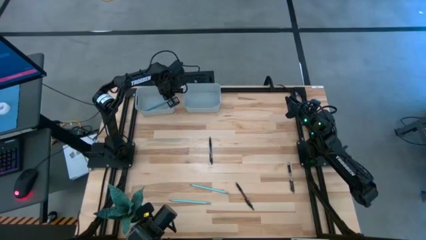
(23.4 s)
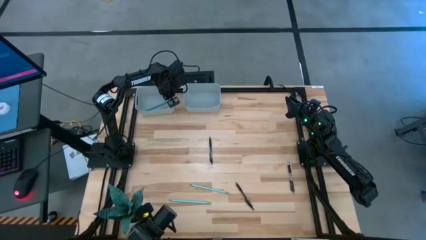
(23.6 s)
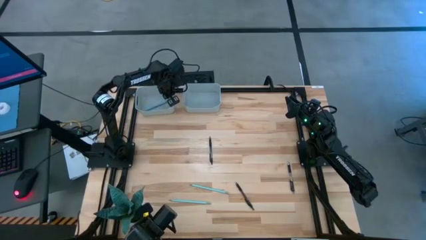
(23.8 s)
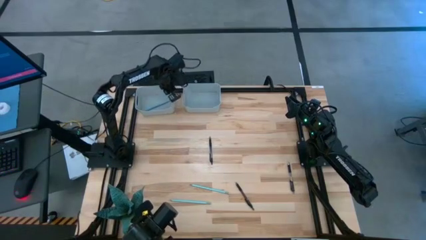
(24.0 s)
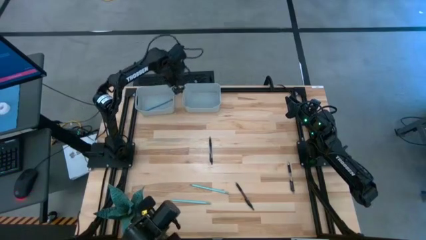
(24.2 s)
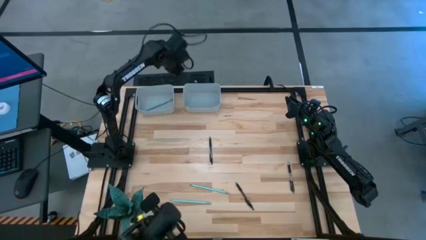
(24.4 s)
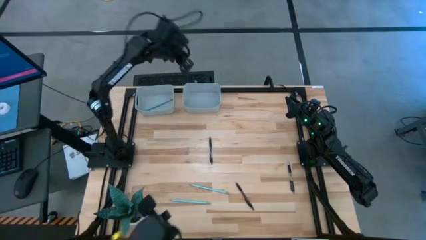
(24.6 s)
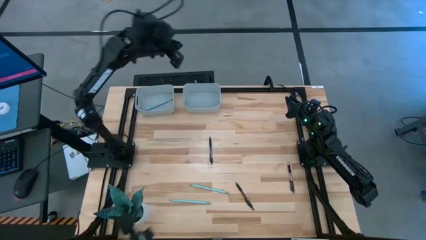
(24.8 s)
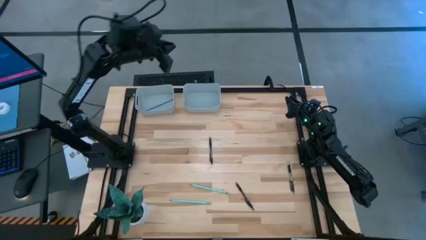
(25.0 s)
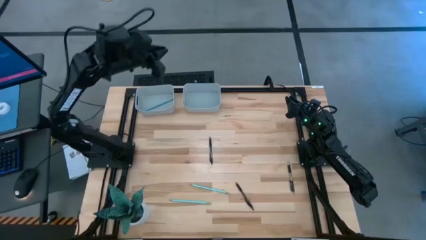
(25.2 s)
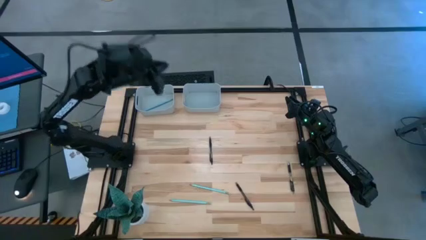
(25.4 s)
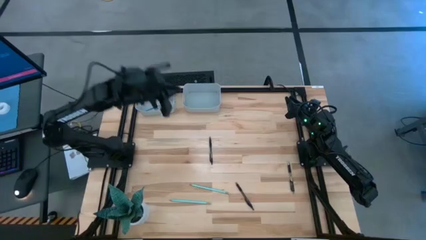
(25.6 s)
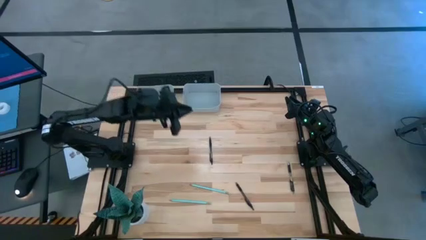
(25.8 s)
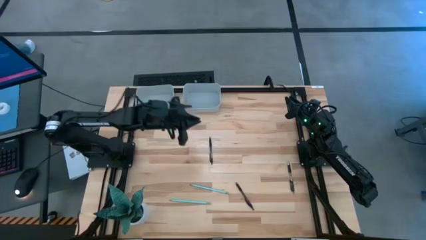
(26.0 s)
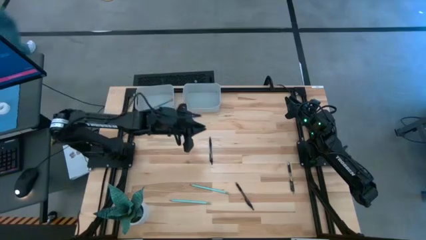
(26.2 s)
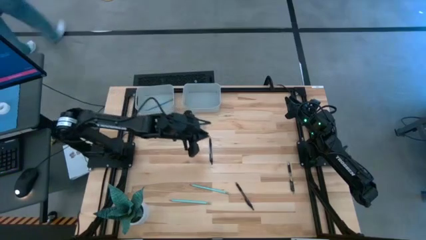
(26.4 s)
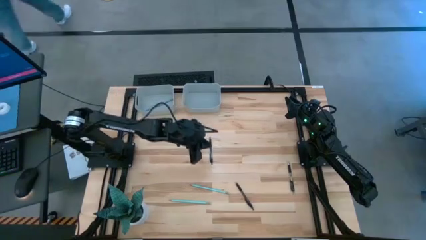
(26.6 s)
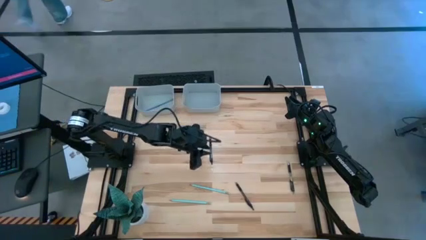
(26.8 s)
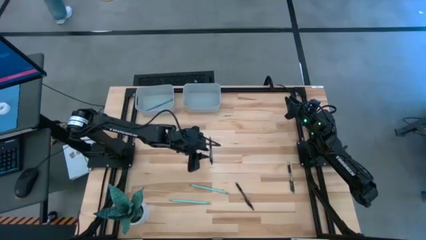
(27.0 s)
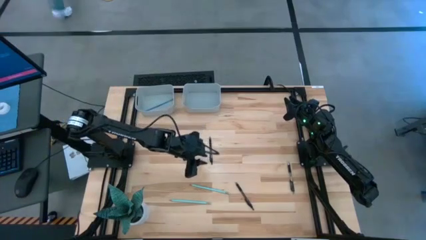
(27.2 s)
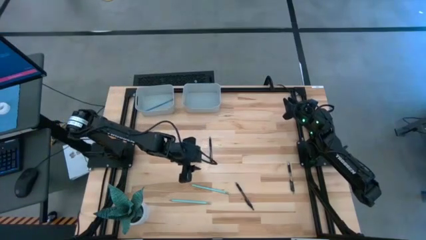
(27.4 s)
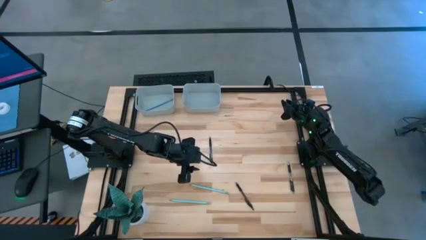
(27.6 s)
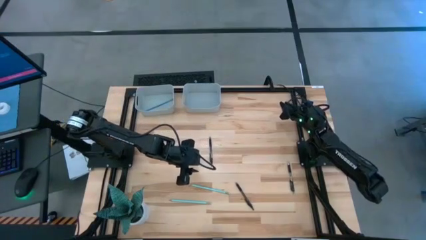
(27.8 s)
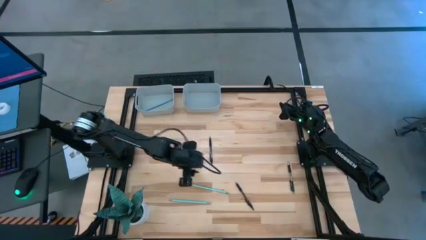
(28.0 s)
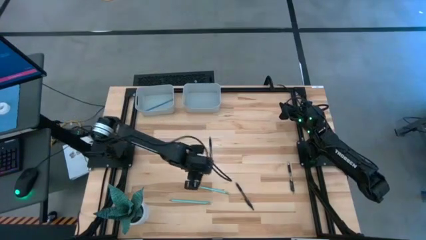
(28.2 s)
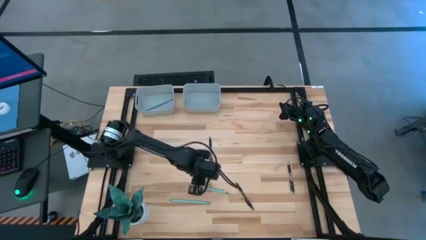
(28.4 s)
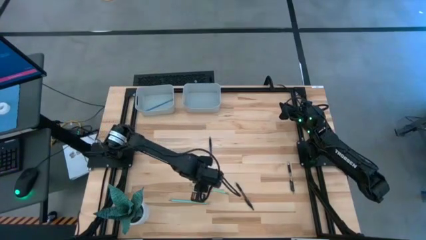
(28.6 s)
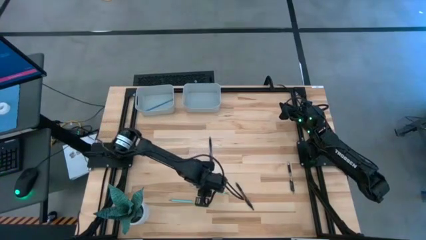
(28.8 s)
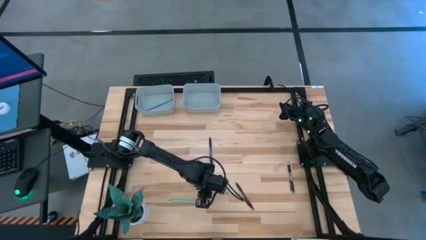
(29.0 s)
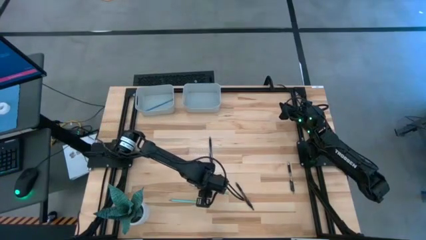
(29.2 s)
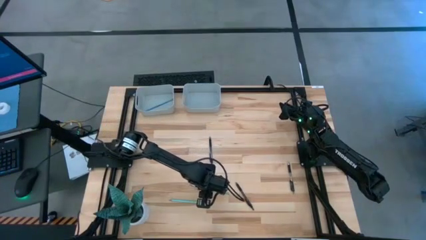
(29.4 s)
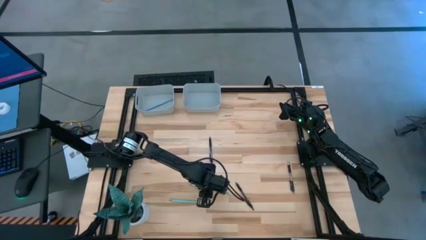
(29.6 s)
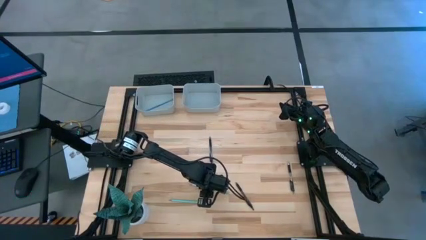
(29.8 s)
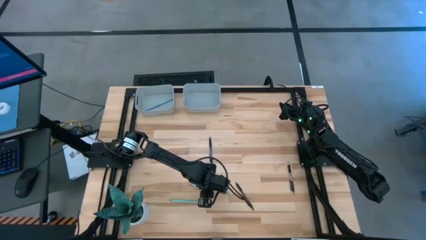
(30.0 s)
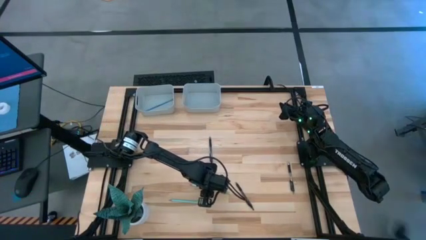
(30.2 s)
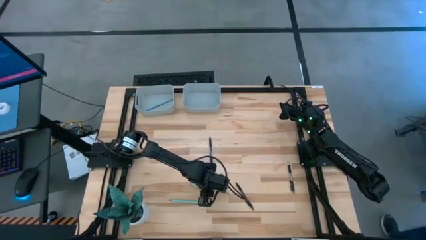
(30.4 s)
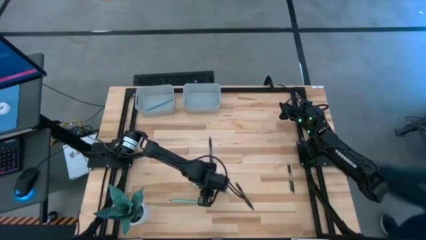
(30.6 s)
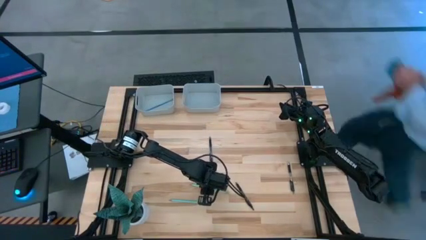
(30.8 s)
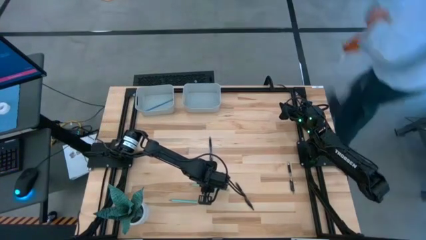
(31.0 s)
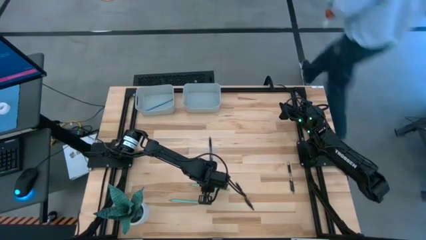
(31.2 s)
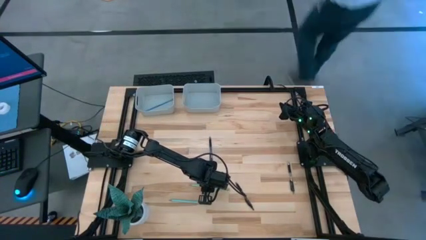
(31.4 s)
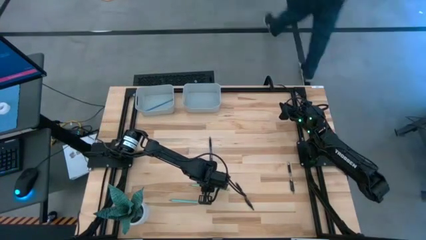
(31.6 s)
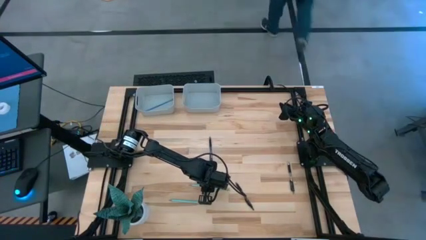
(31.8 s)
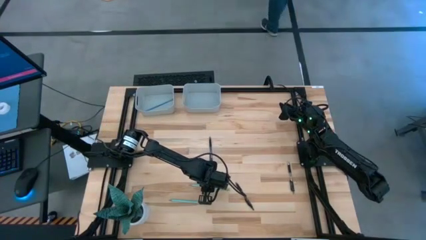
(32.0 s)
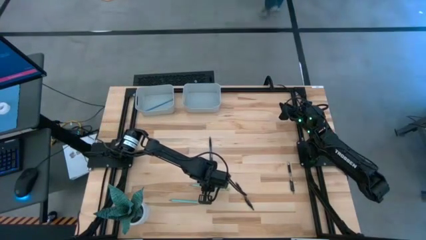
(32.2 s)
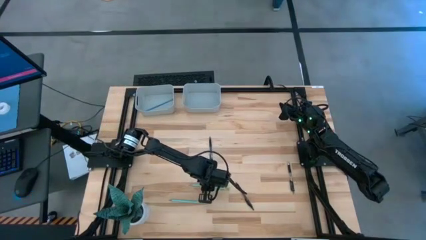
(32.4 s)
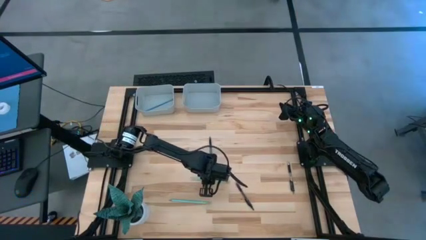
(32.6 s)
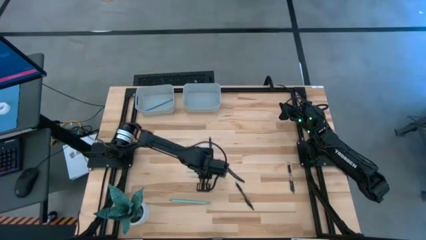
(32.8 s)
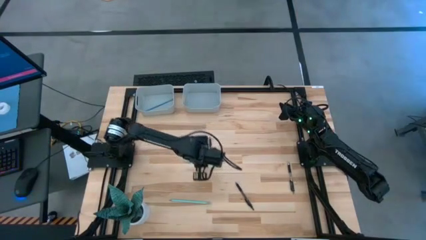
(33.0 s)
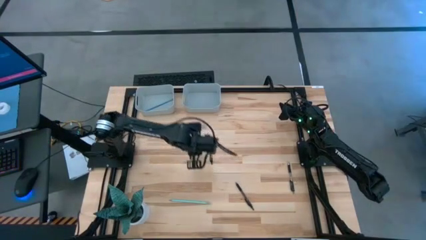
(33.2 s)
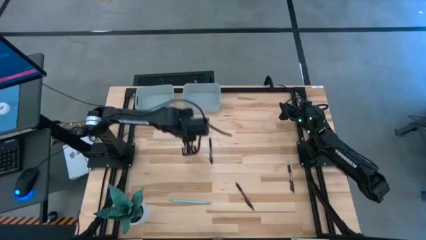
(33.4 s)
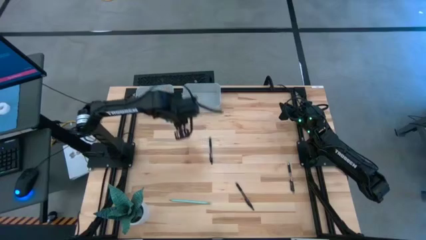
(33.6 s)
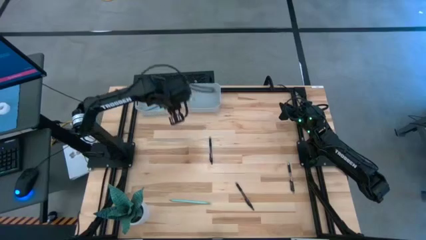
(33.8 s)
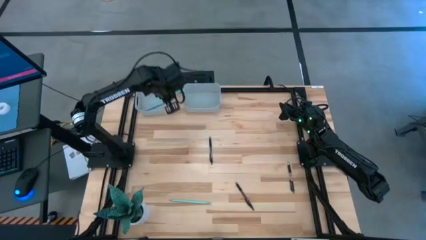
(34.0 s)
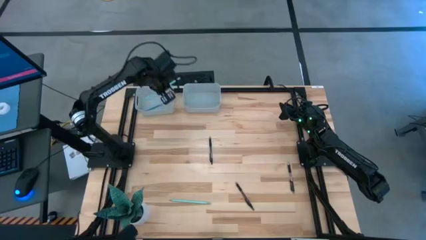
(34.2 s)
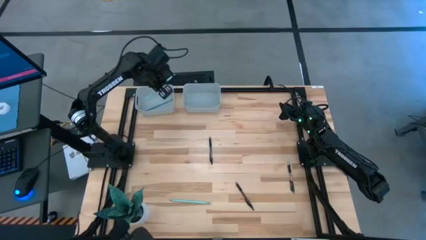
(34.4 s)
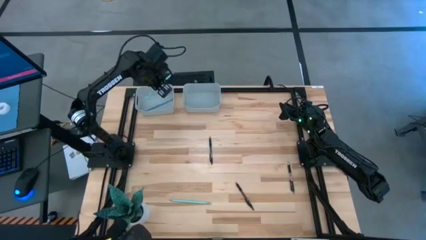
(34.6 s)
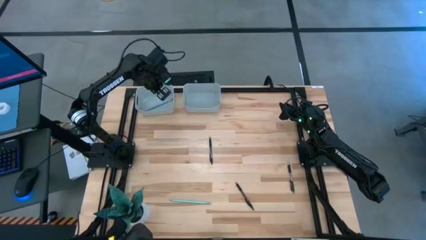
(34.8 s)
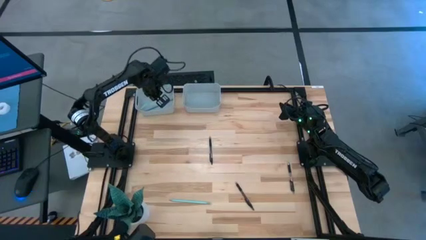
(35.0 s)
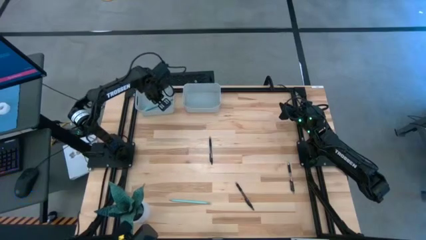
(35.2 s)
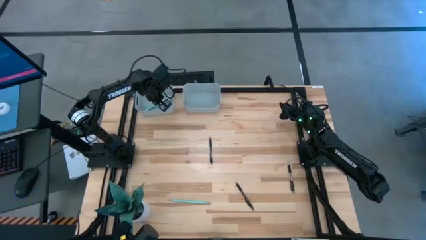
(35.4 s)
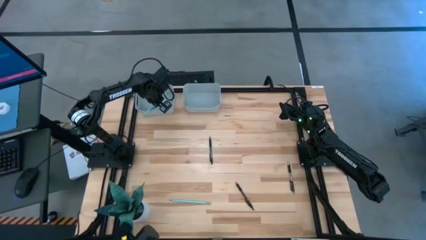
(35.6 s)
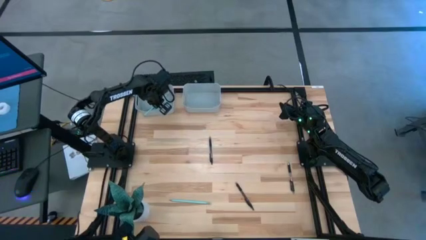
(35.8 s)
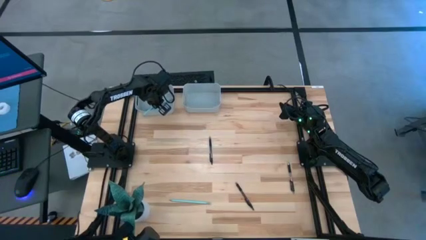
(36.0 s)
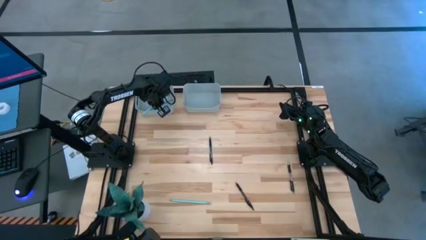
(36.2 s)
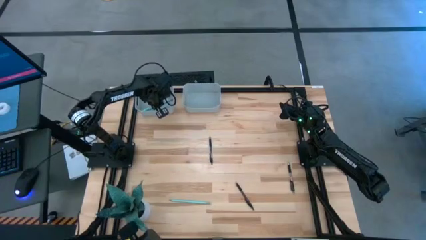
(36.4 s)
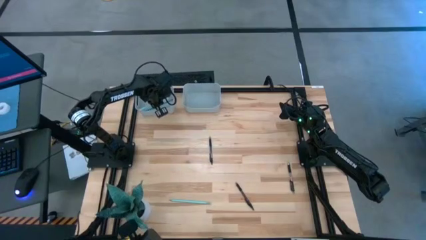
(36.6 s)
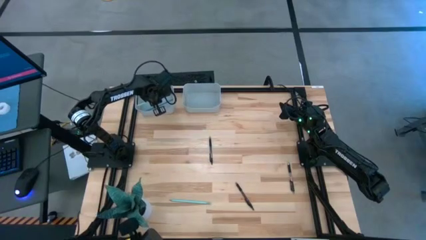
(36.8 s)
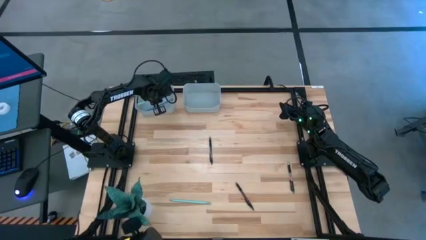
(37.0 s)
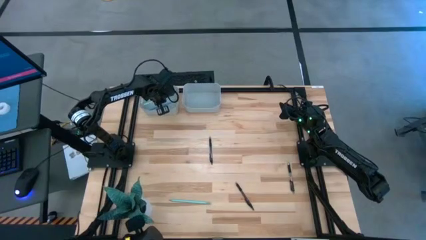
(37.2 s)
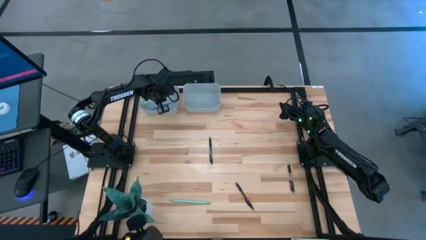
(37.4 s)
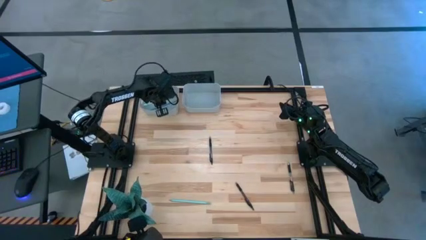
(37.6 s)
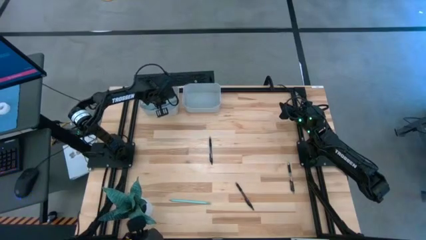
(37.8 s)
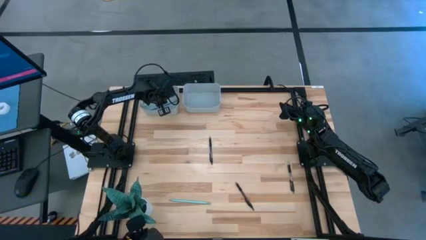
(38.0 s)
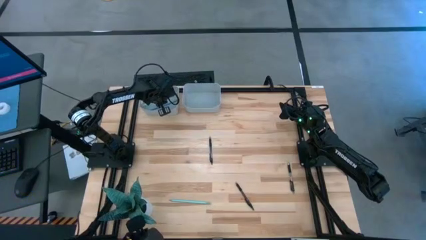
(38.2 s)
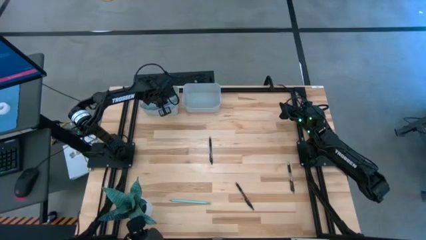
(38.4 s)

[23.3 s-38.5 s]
Task: Sort pens & pencils
Put the top green pencil into the left gray bin
